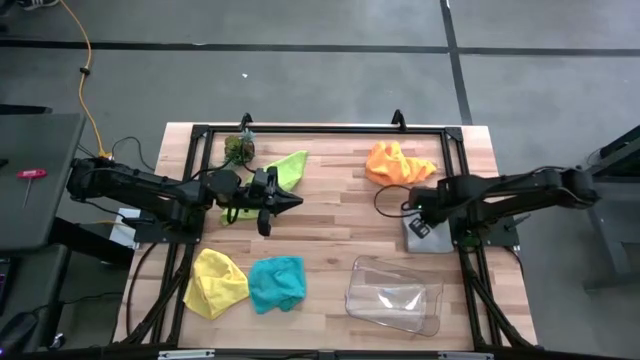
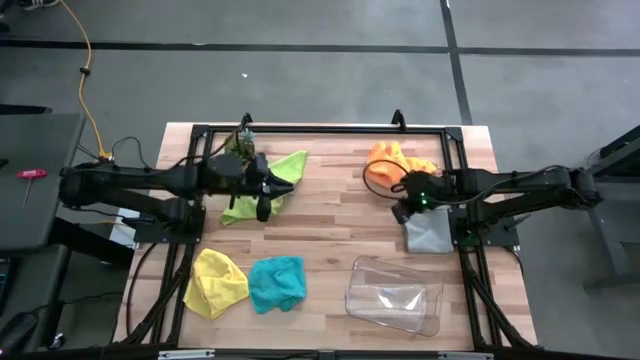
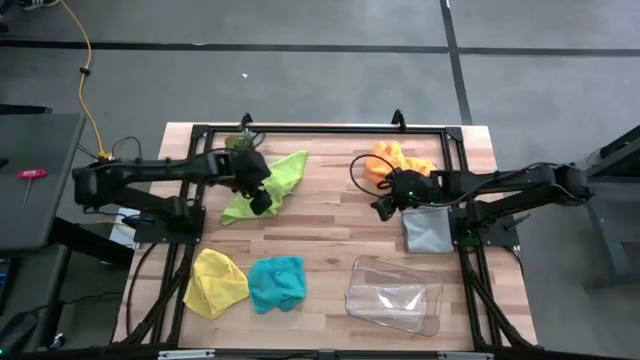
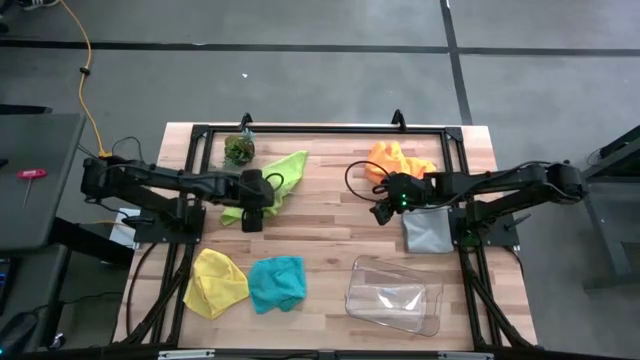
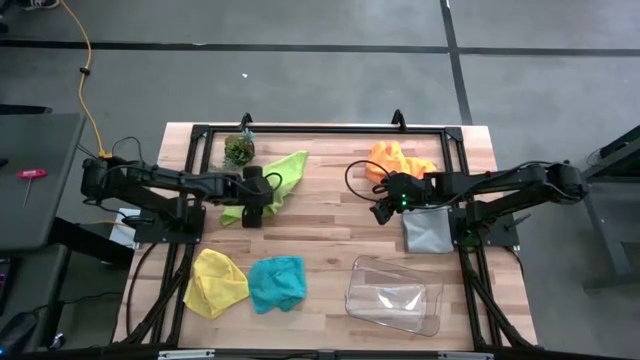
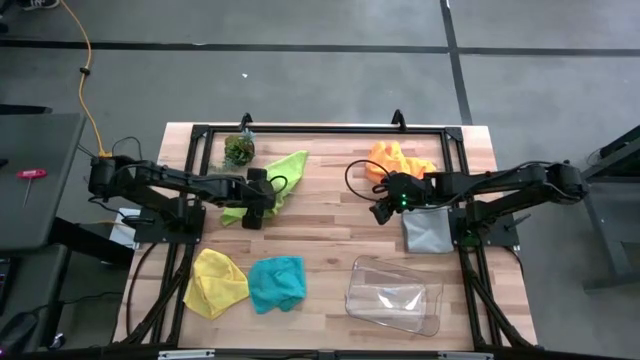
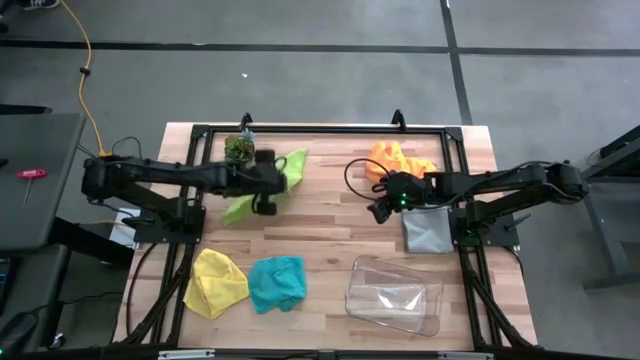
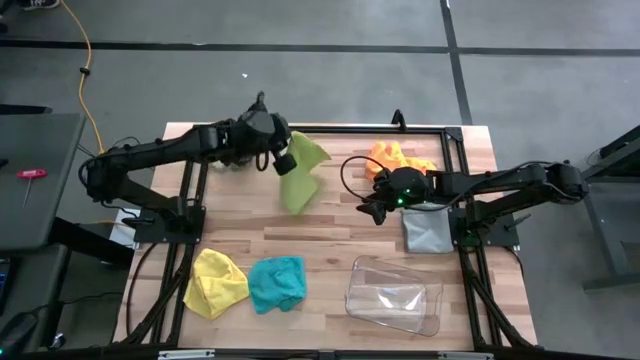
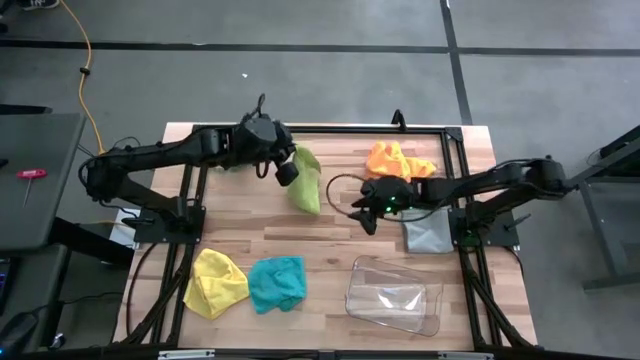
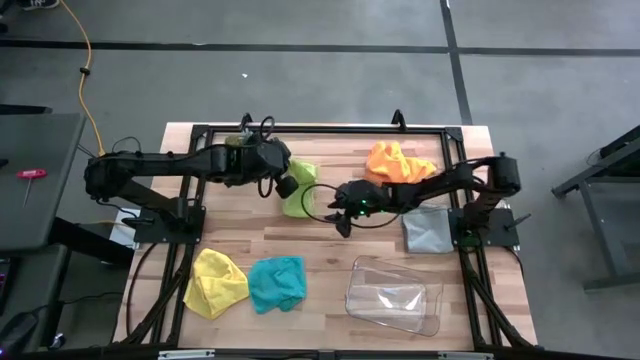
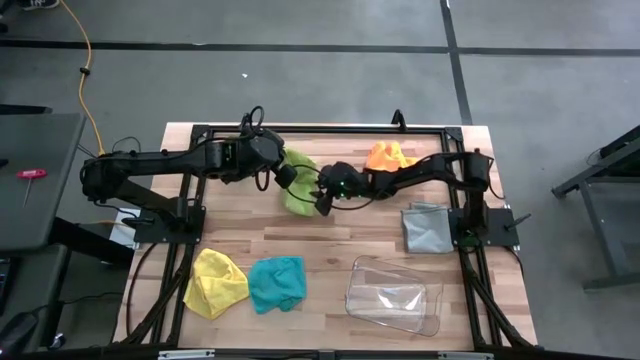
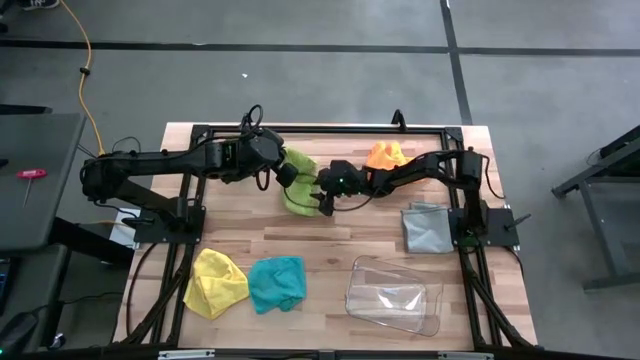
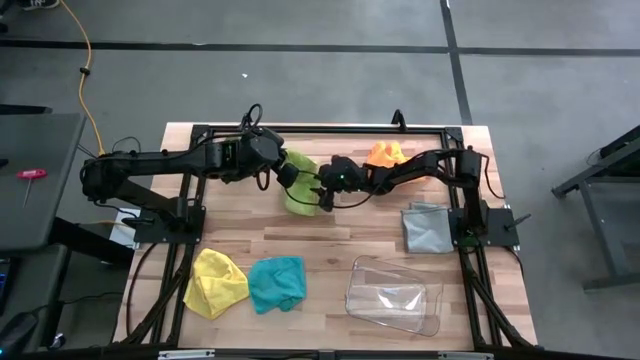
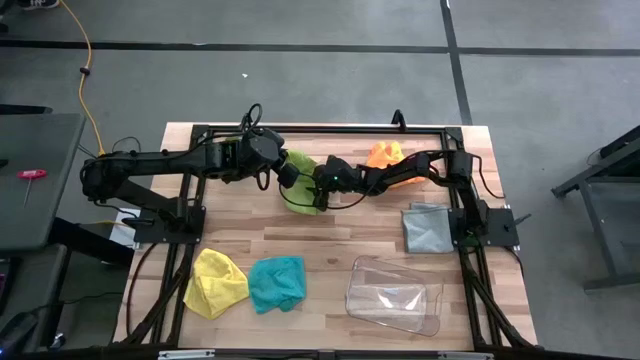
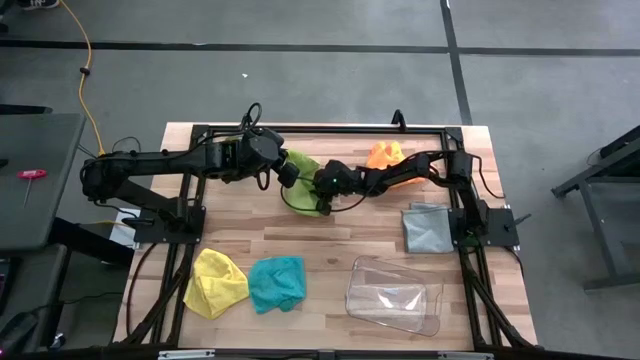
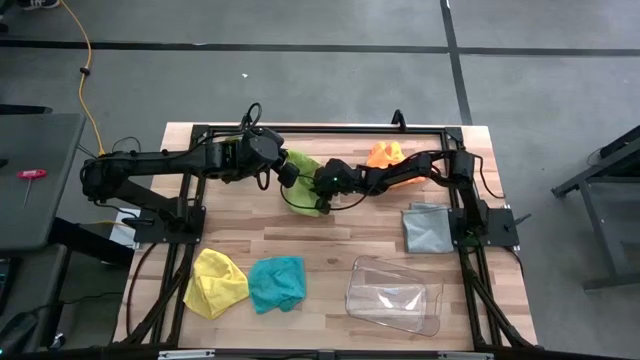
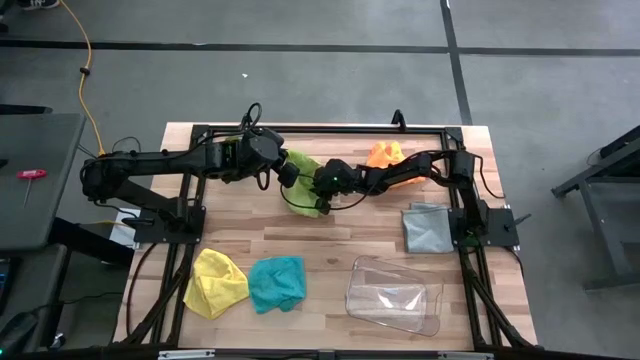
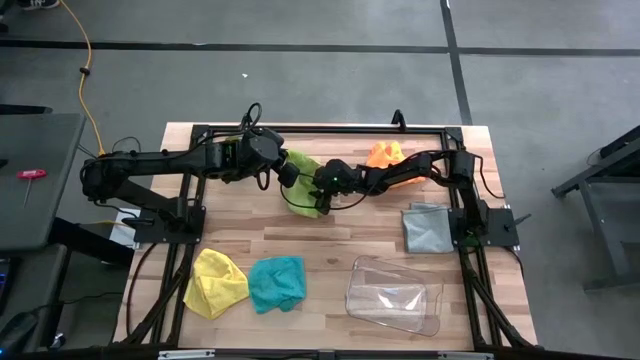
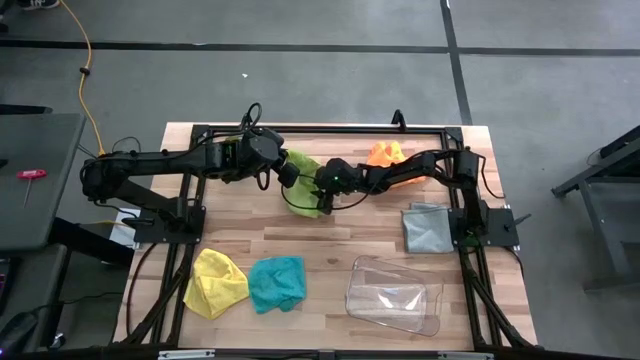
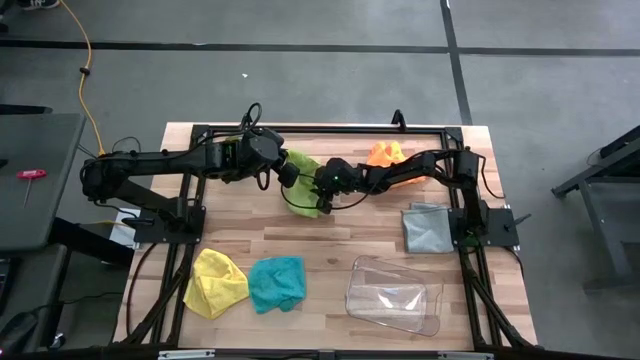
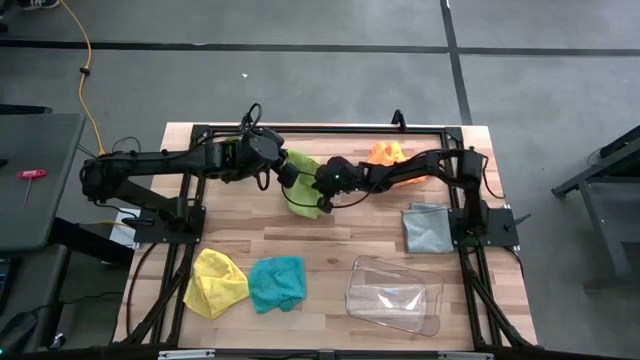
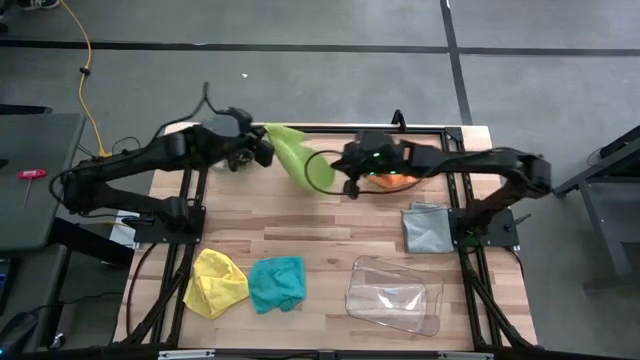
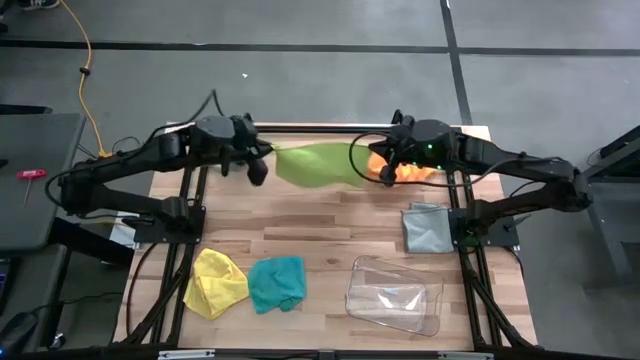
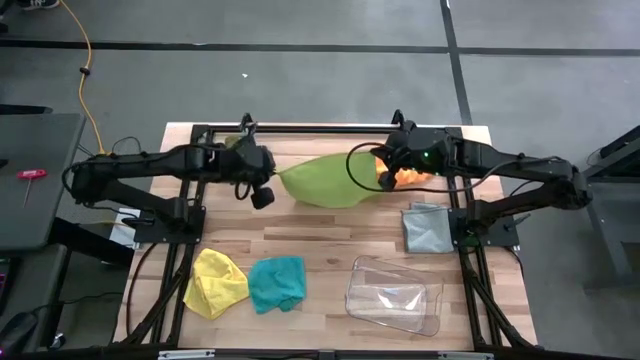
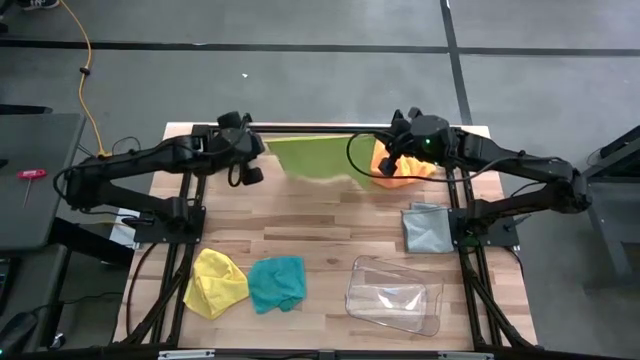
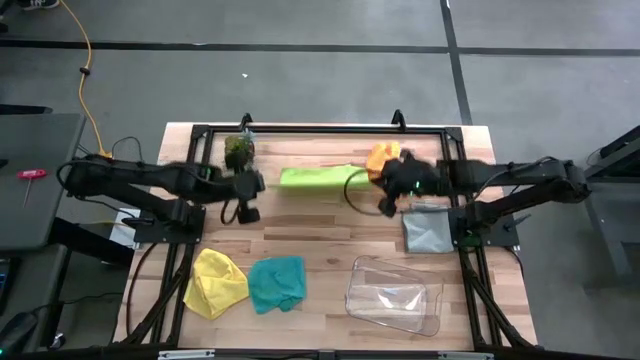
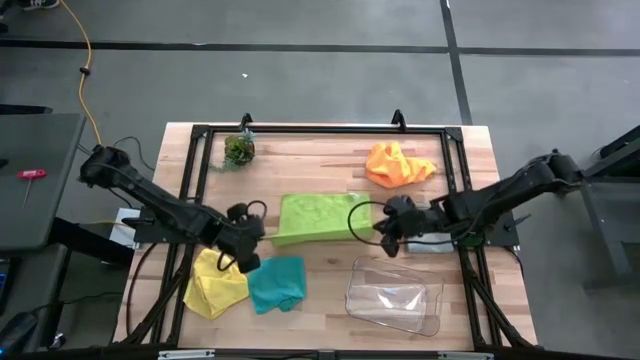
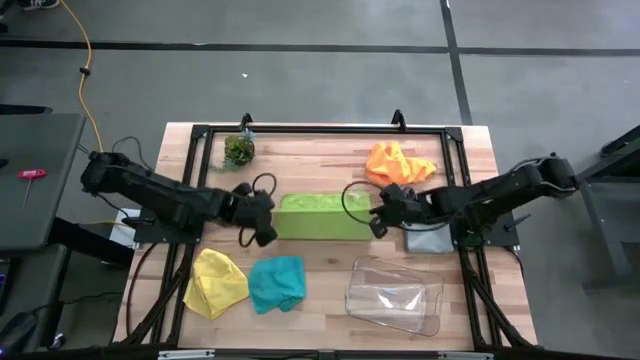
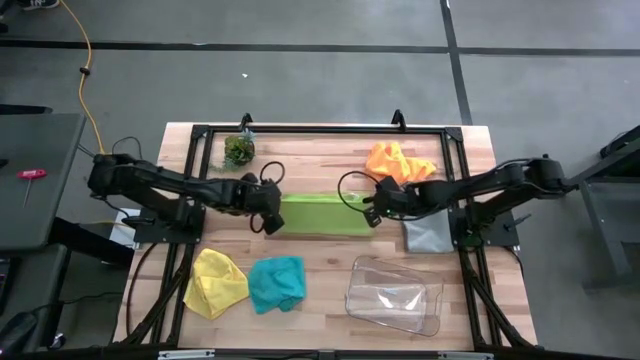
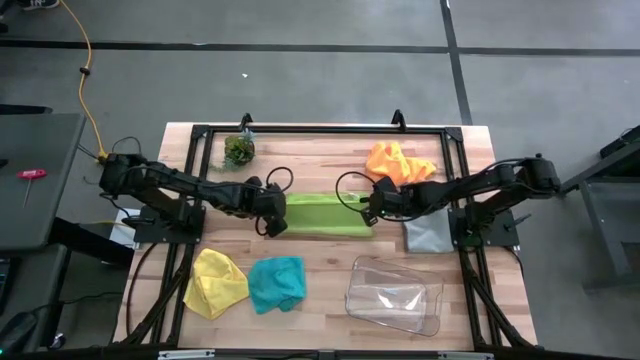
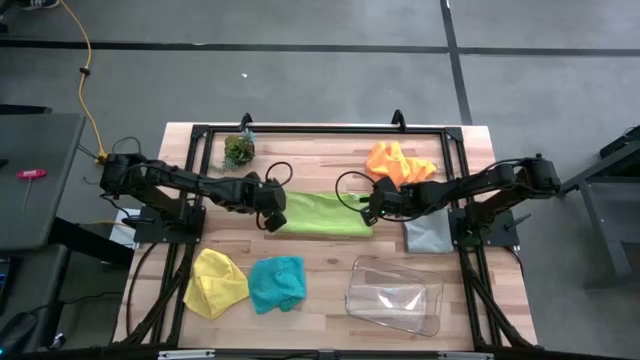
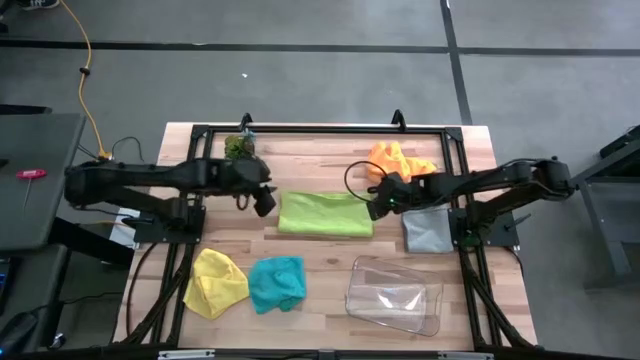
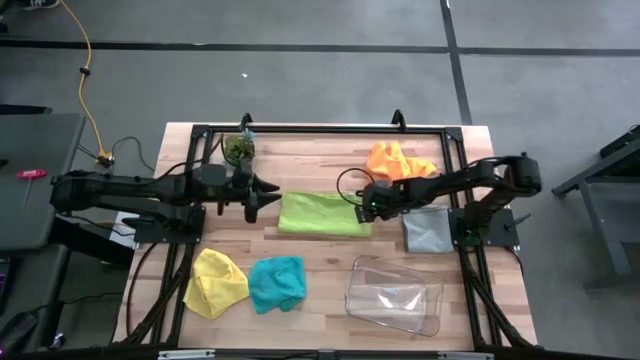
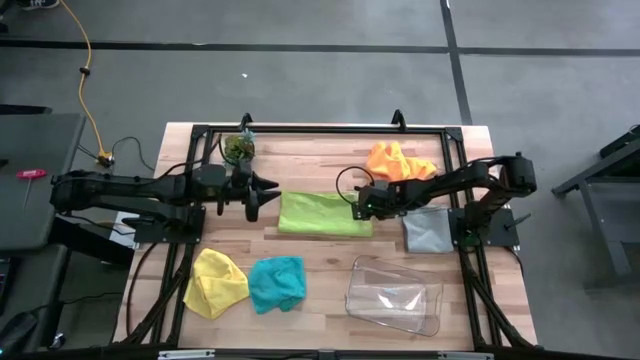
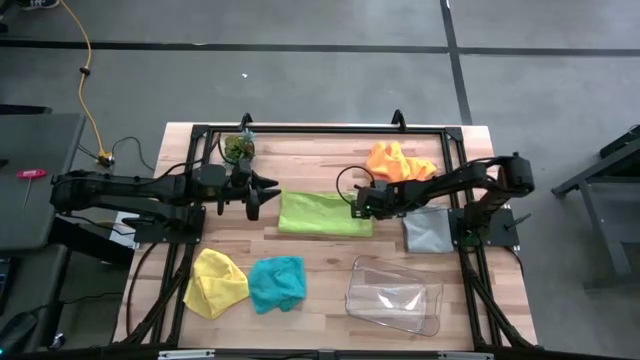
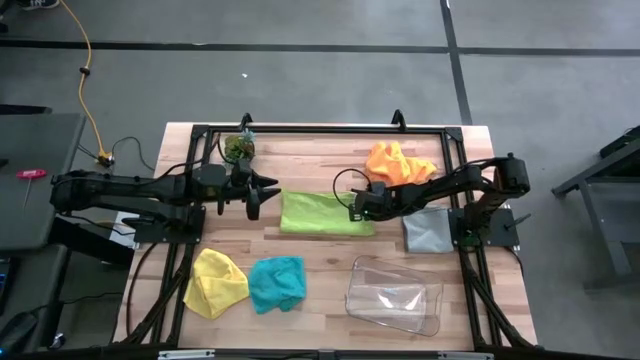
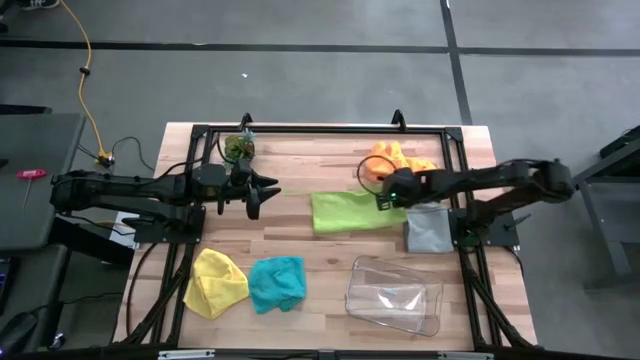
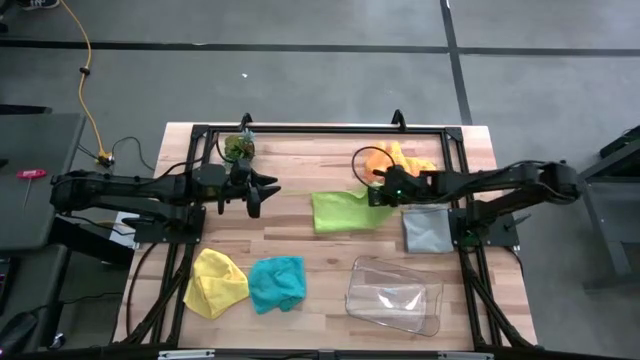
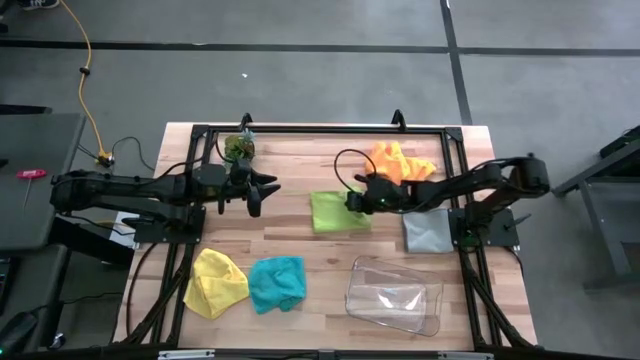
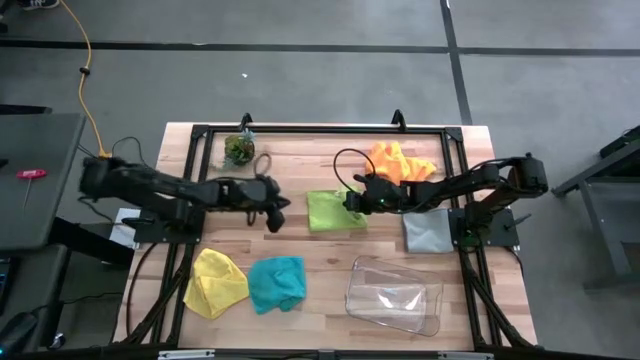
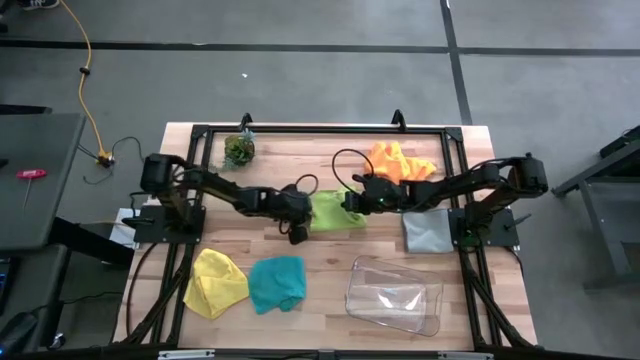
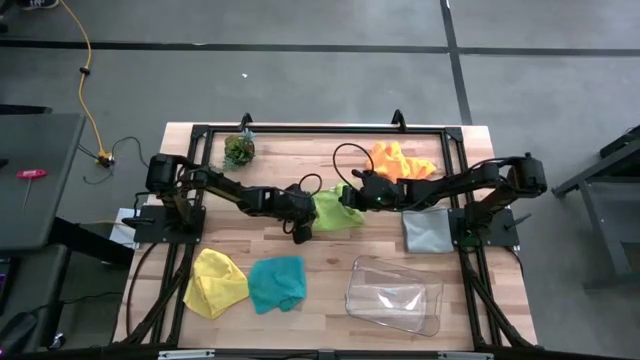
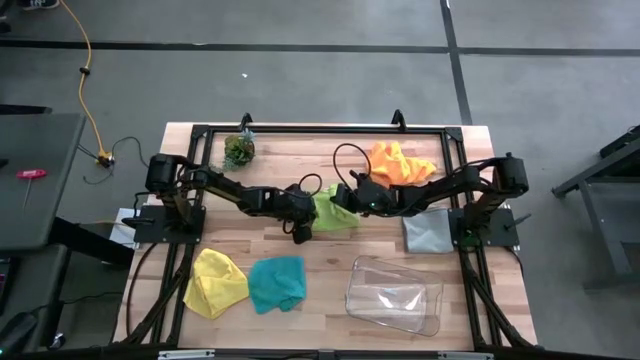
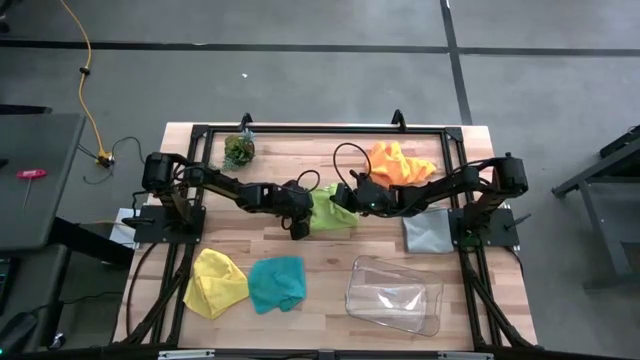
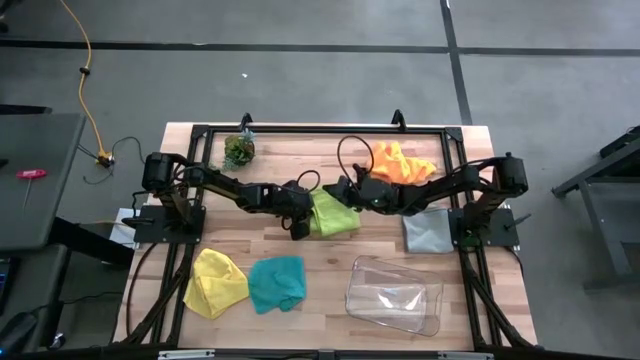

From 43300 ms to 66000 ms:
Task: Fold microfiber towels
Fold the green cloth
